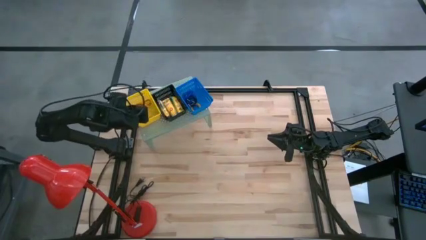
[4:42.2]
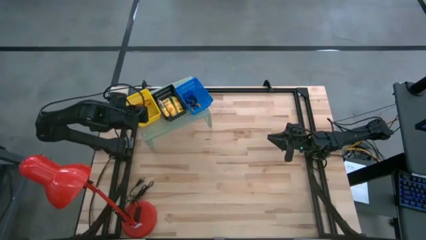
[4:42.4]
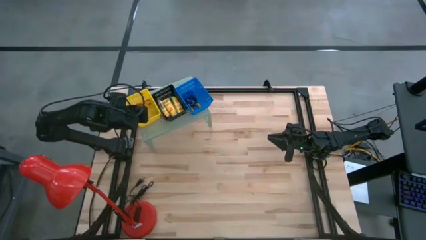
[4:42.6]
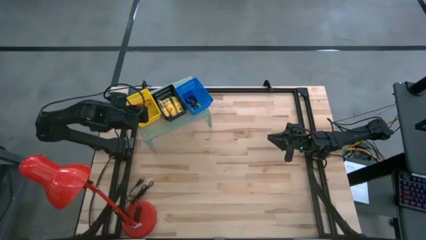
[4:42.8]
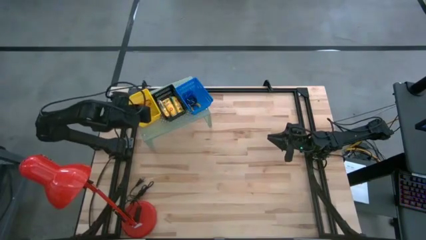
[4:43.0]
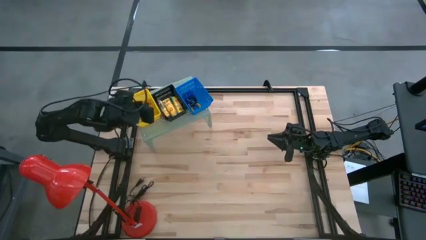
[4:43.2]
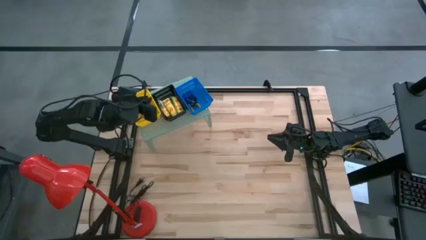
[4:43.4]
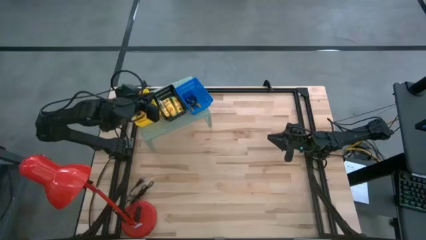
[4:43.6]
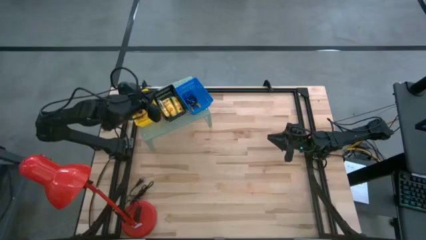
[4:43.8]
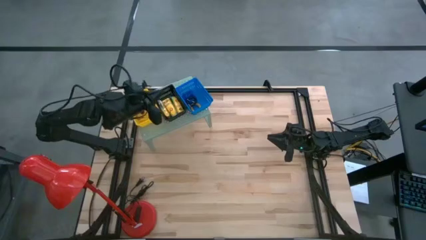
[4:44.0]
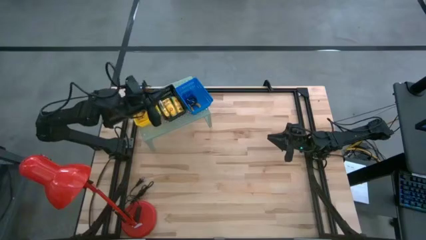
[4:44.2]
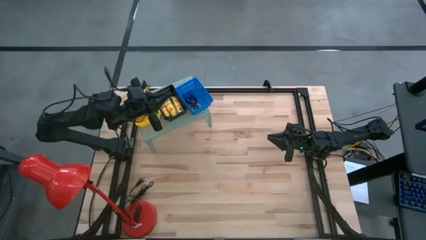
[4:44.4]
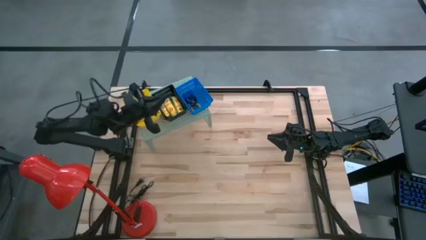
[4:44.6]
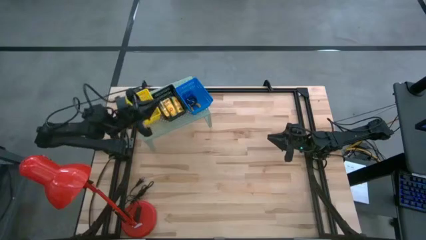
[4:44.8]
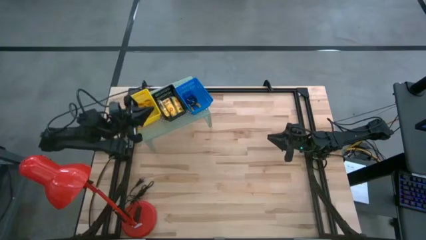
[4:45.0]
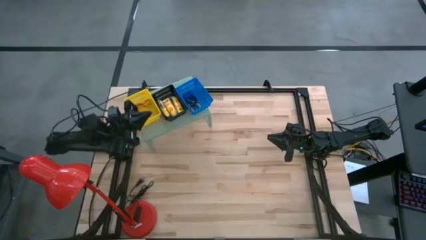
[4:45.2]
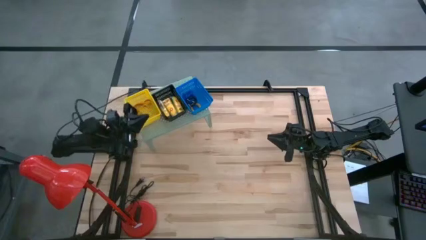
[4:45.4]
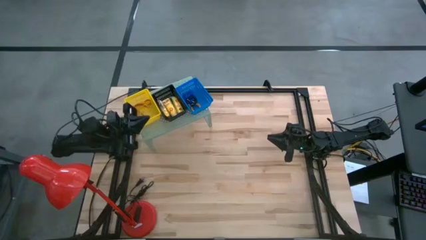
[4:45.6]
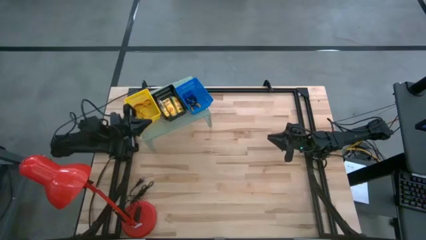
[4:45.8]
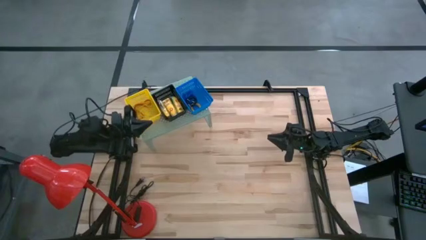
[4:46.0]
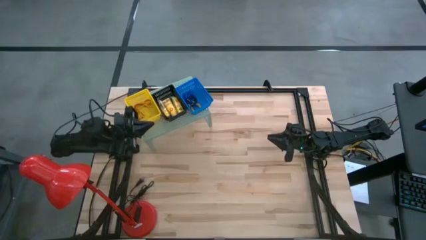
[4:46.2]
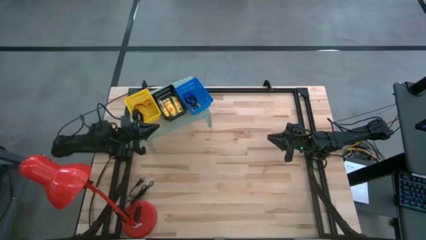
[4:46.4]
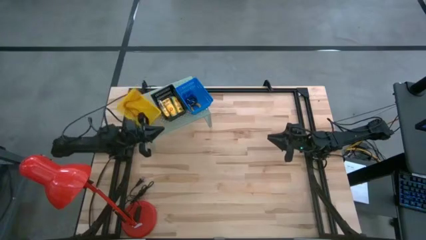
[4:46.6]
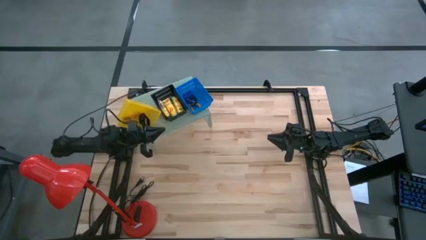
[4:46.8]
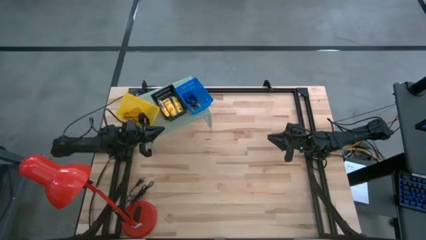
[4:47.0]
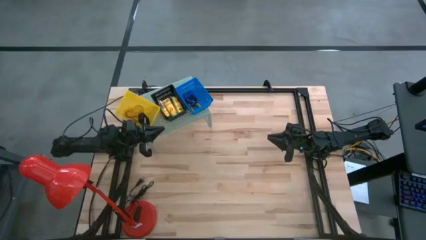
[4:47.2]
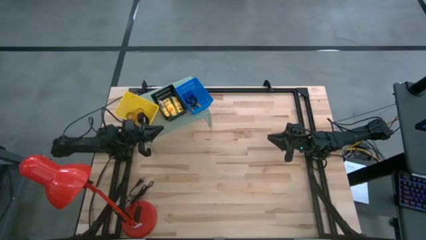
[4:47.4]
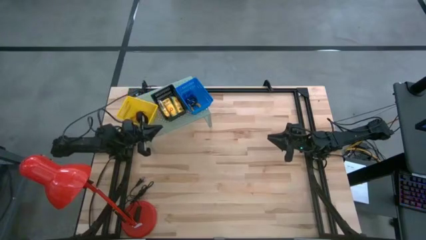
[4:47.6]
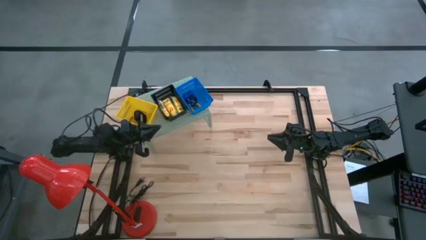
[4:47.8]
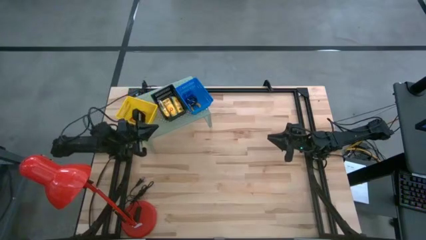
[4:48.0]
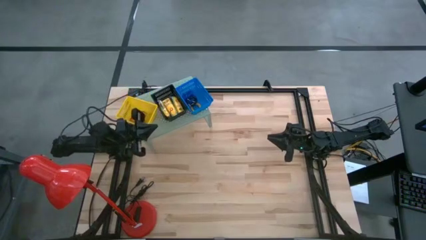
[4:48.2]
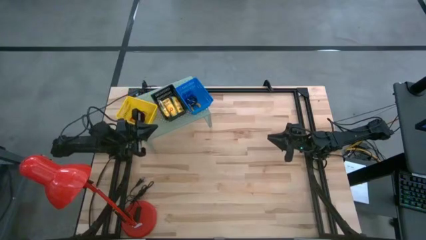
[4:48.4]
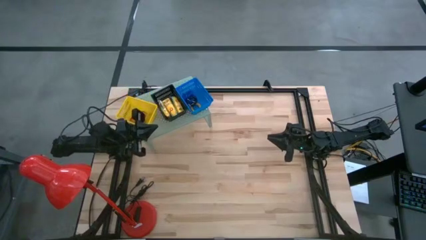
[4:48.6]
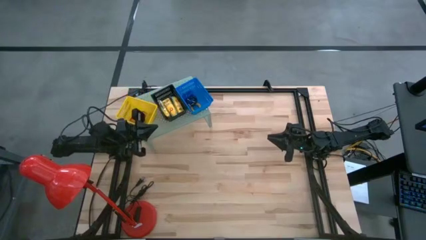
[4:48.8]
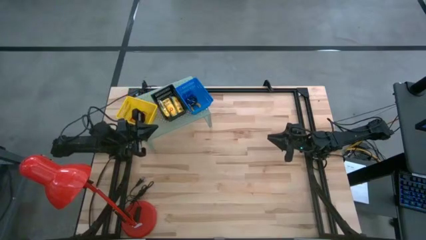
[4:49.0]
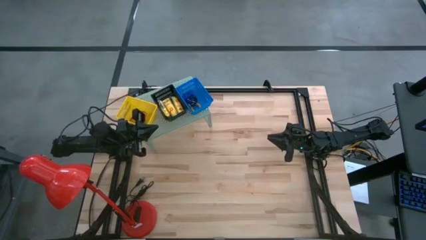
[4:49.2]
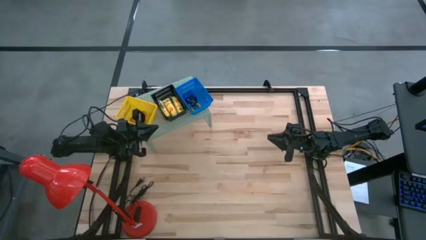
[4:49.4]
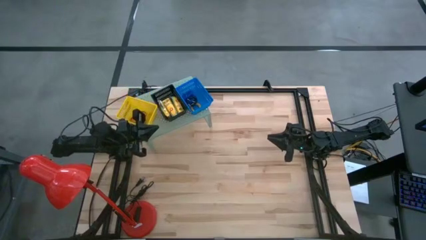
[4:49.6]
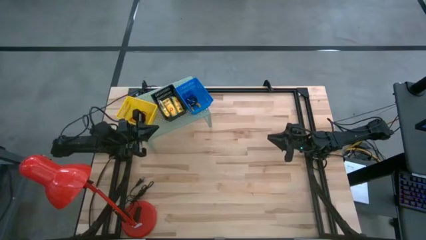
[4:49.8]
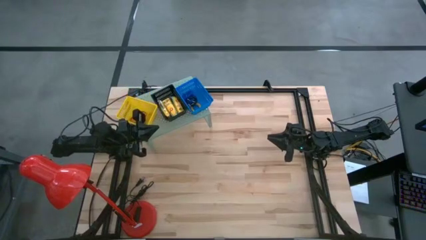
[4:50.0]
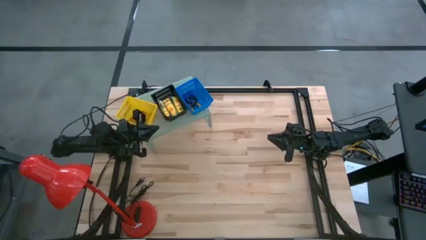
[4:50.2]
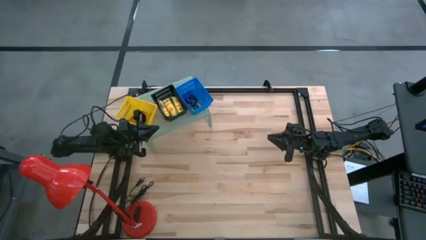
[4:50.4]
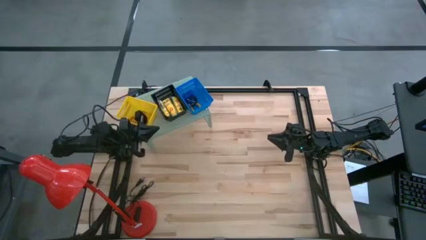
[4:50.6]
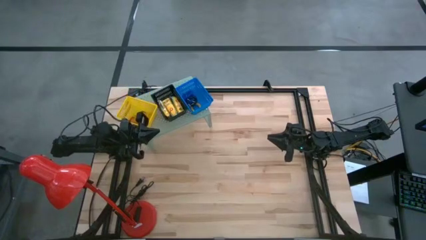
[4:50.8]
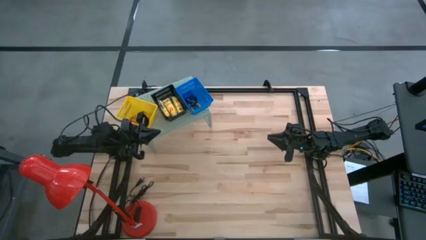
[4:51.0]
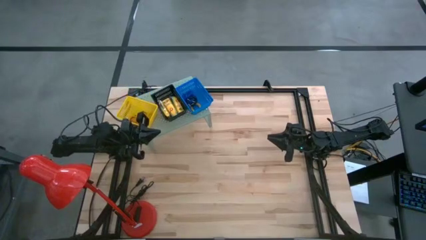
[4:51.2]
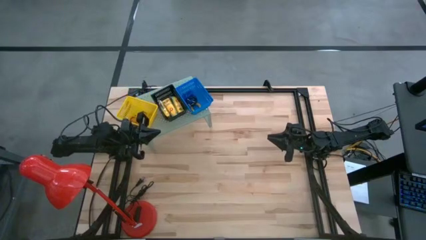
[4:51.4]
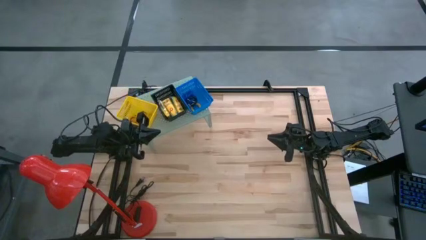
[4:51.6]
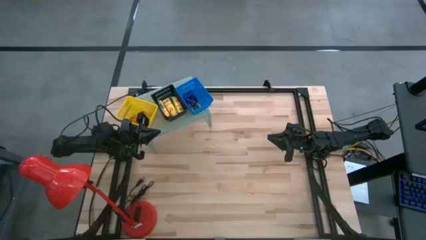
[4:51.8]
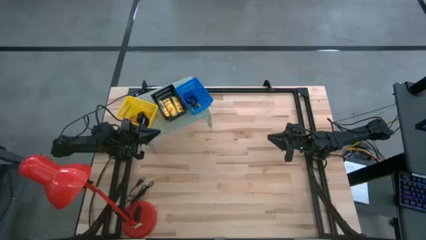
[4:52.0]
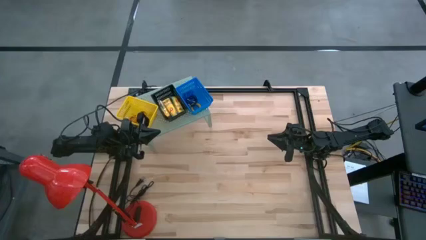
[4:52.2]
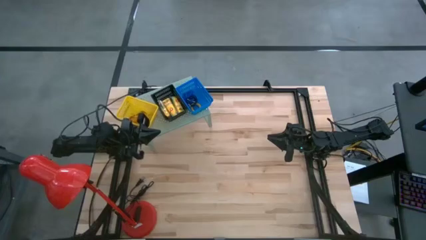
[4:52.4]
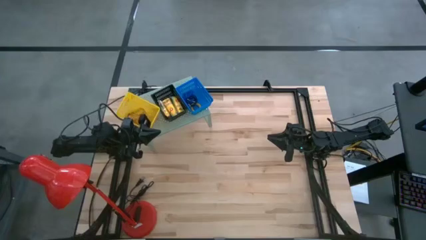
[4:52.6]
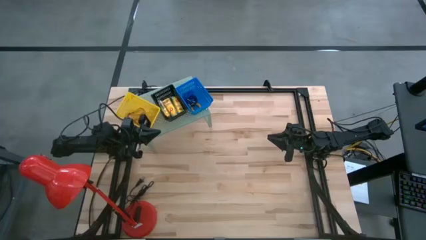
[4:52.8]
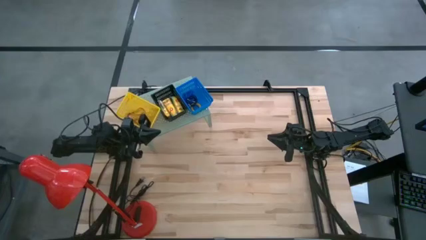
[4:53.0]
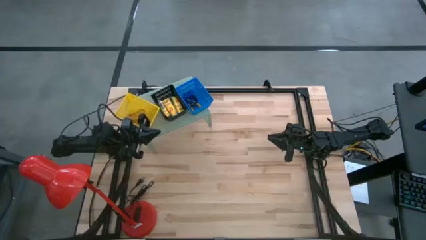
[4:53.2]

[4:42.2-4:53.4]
Task: Pick & Place Office Desk Supplies
Return to Home Position

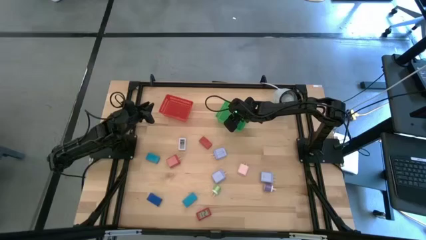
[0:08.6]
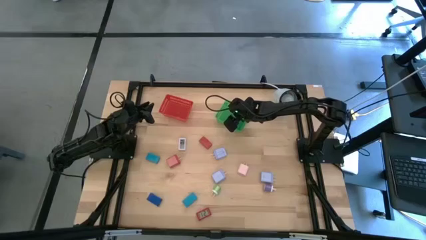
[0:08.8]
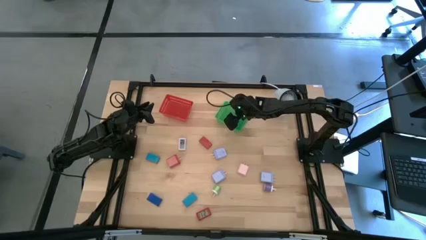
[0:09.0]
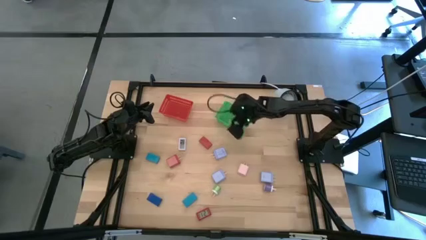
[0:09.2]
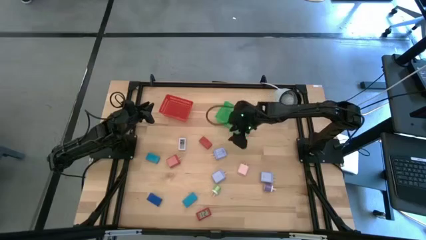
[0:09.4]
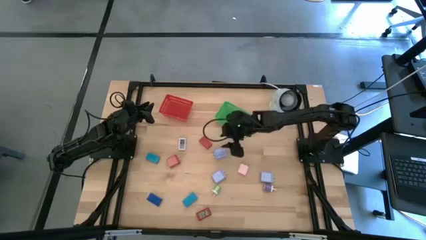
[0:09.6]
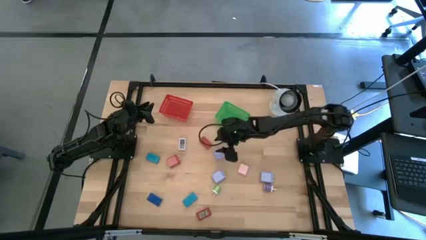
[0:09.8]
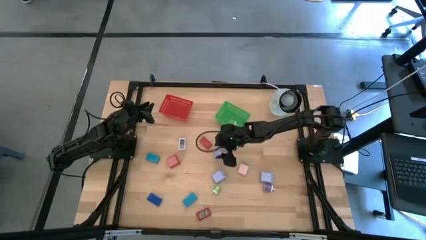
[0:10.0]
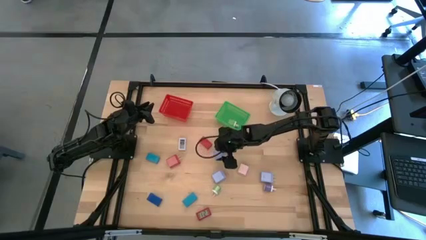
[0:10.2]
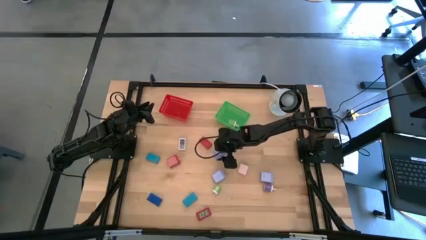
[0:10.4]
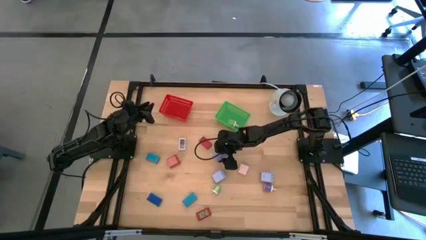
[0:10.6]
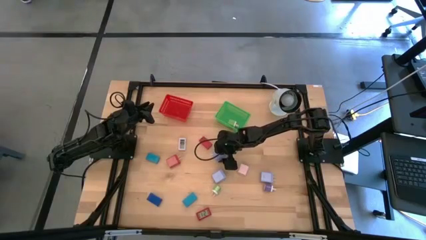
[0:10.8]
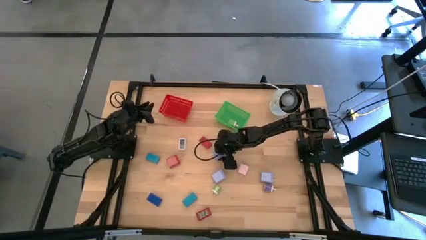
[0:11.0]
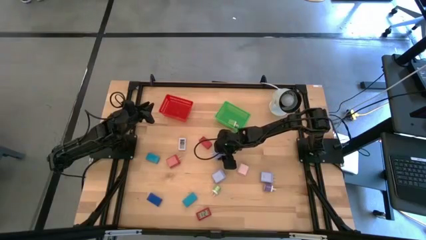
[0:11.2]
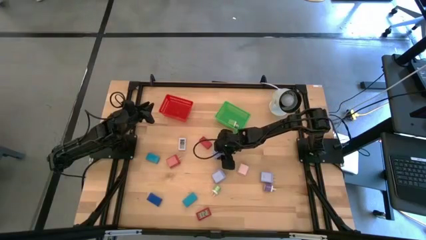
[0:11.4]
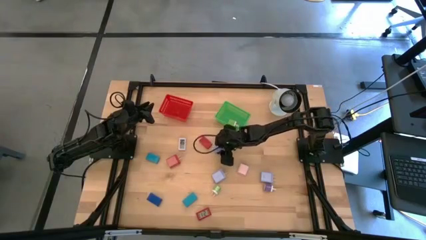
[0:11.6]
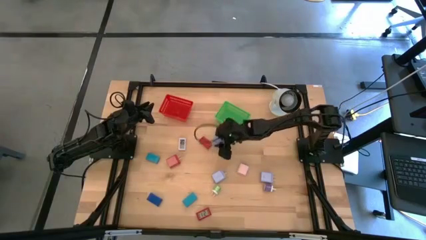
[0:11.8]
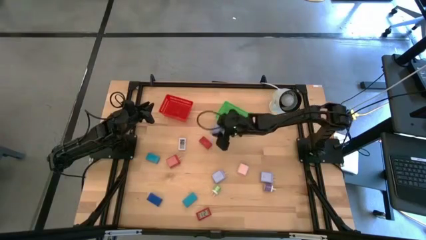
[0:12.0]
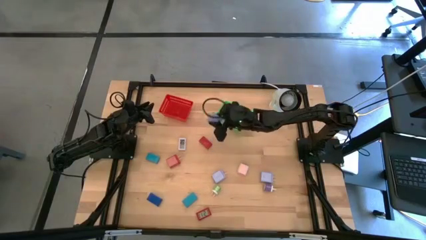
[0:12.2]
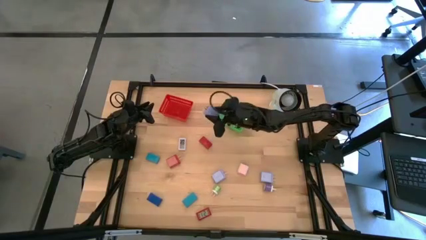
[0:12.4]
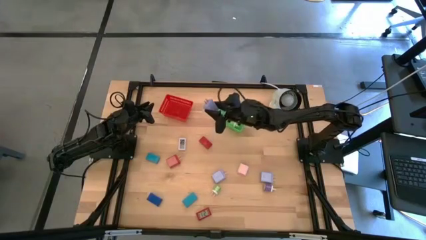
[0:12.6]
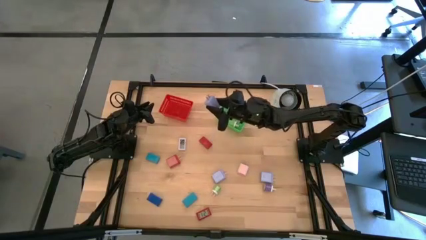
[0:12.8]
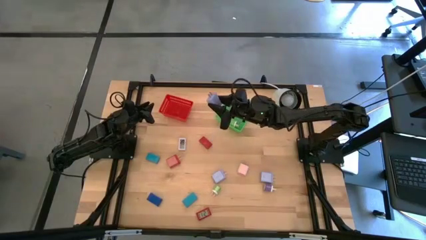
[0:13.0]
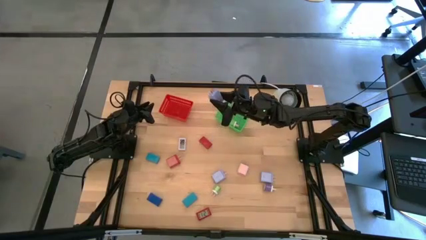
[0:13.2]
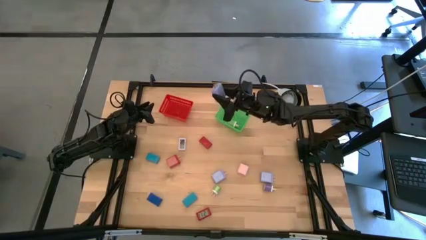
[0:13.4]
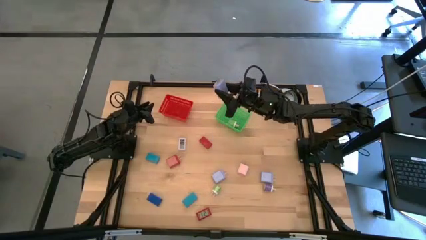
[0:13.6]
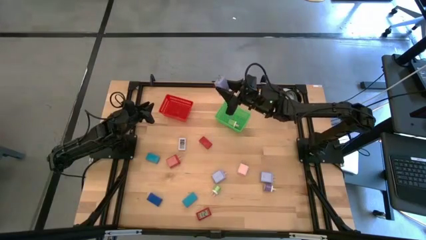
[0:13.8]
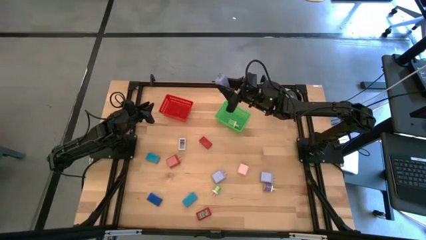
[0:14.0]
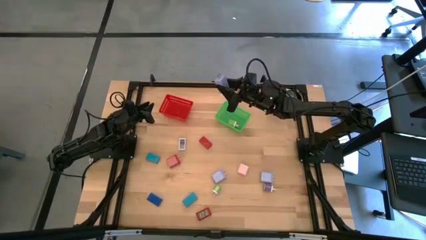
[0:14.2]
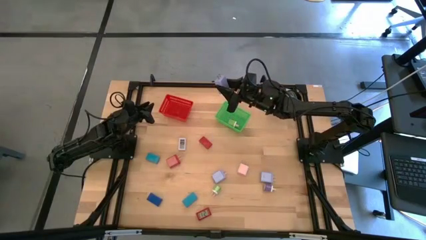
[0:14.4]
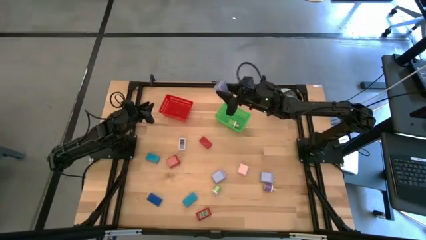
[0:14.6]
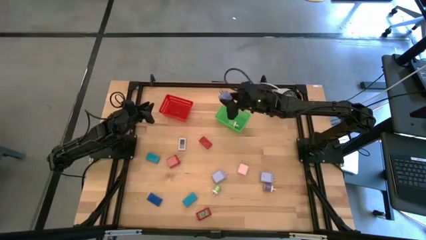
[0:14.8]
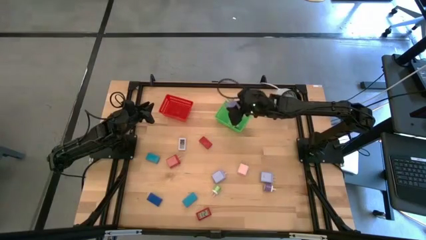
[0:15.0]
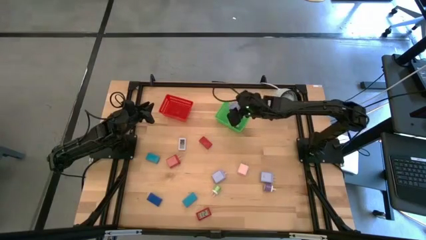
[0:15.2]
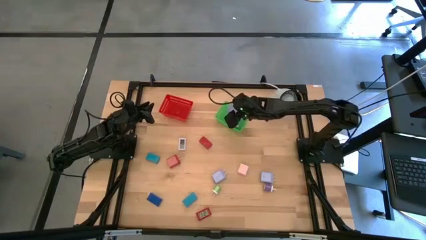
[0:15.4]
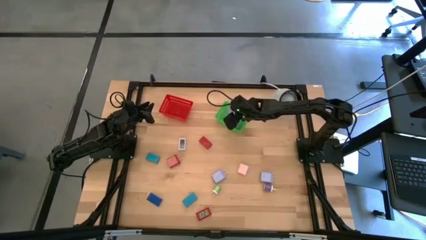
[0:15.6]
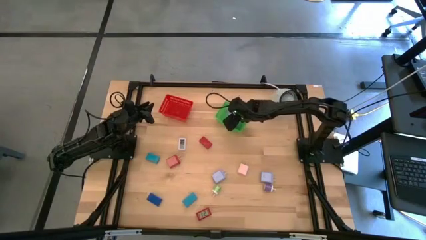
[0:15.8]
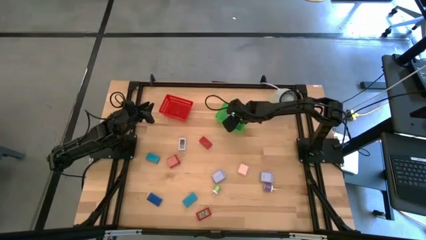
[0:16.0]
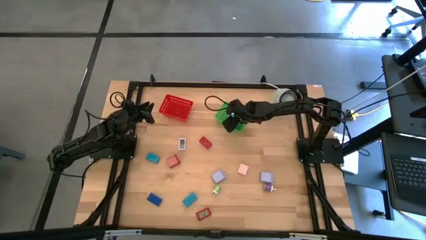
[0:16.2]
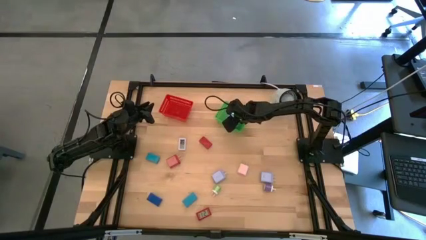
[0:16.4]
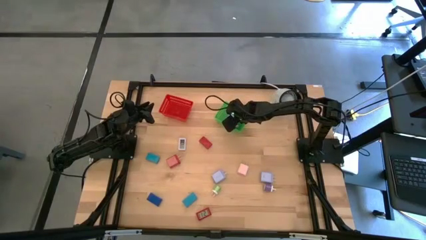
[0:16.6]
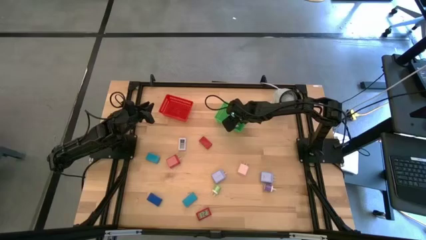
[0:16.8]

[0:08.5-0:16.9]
Task: Pick & Place Office items
Put the top light violet charger adapter into the green bin
